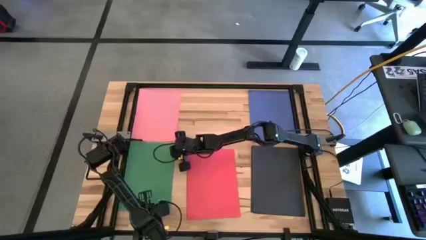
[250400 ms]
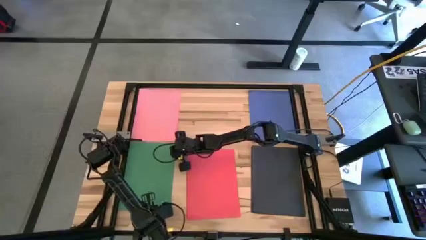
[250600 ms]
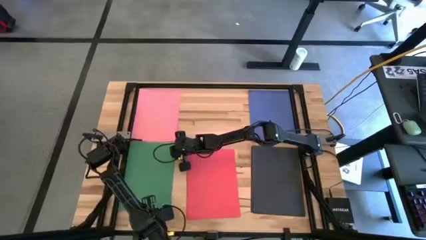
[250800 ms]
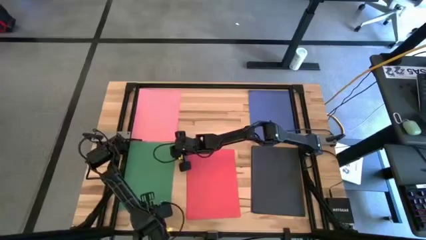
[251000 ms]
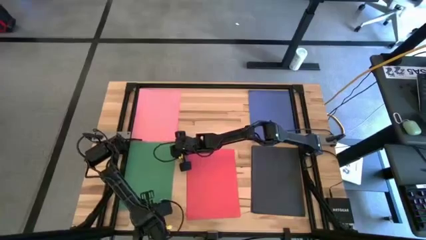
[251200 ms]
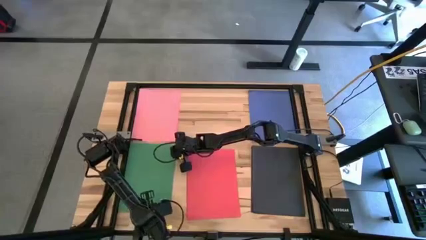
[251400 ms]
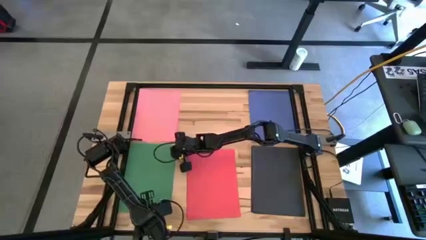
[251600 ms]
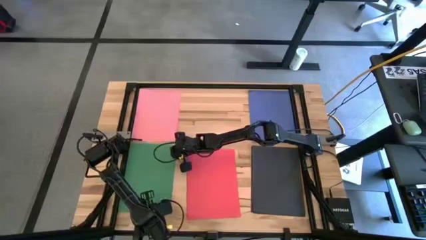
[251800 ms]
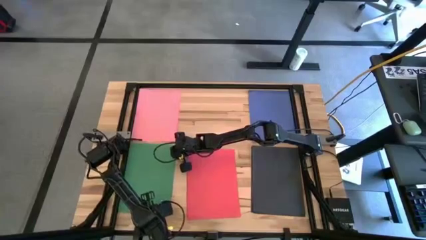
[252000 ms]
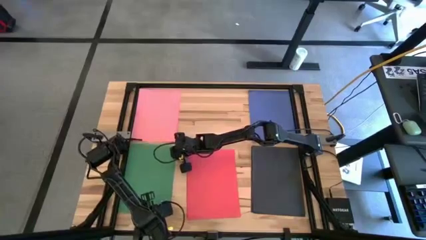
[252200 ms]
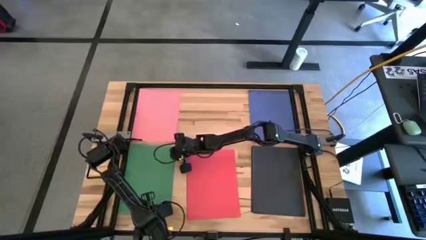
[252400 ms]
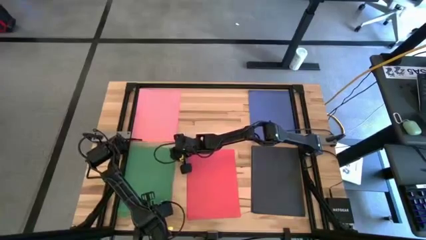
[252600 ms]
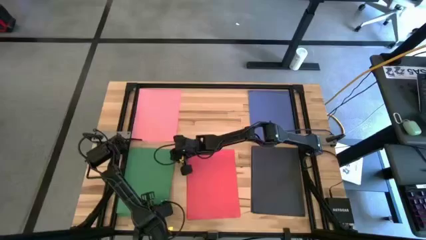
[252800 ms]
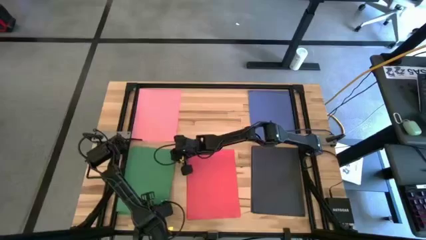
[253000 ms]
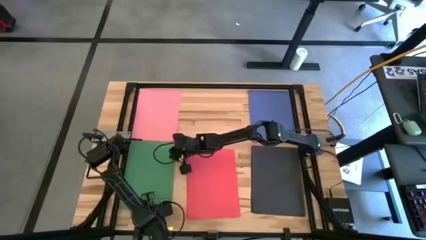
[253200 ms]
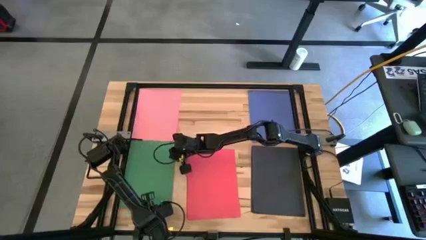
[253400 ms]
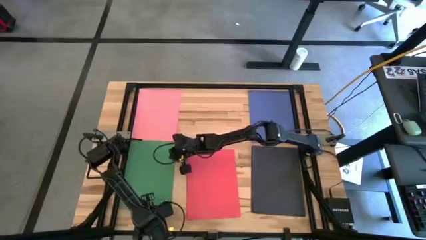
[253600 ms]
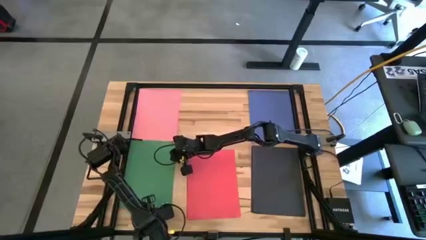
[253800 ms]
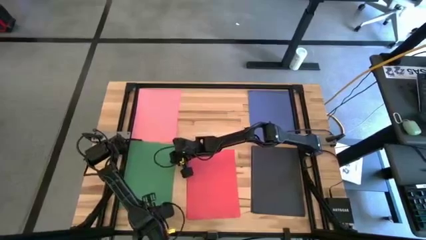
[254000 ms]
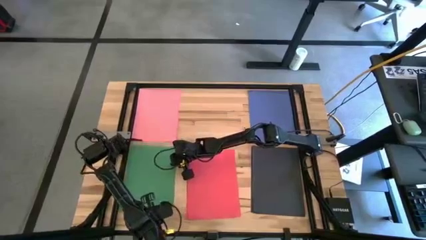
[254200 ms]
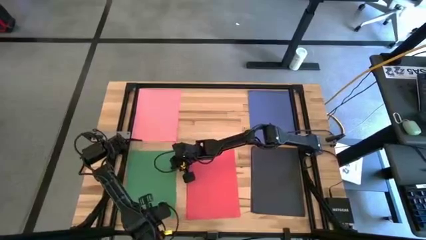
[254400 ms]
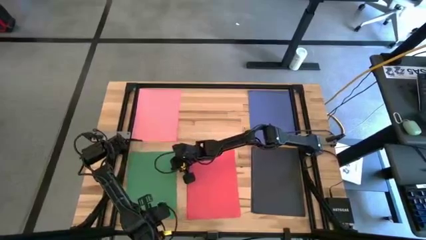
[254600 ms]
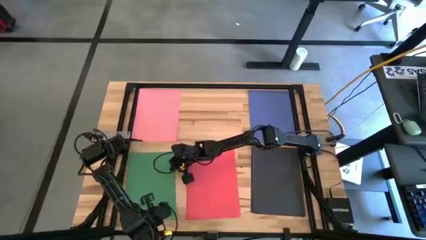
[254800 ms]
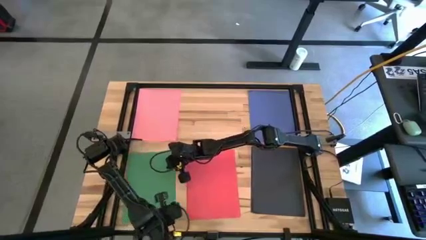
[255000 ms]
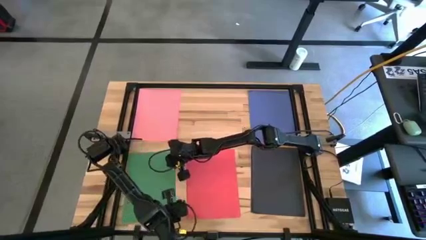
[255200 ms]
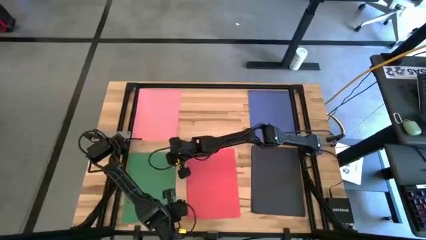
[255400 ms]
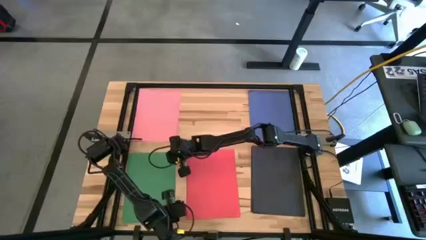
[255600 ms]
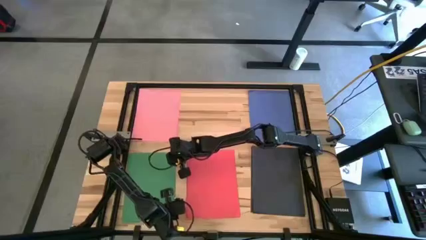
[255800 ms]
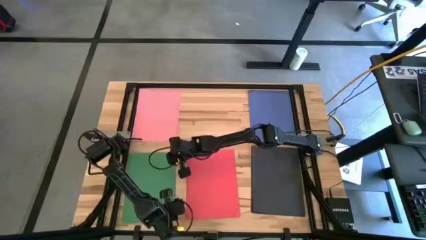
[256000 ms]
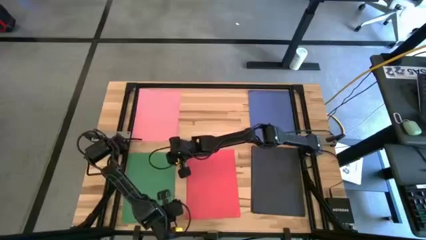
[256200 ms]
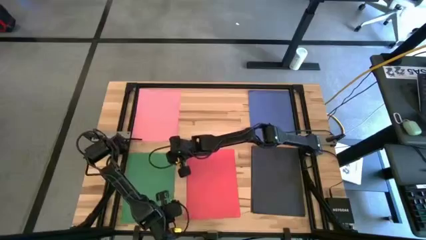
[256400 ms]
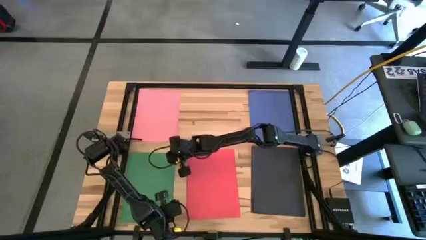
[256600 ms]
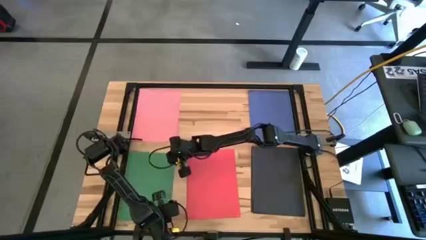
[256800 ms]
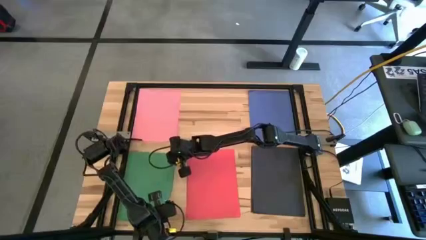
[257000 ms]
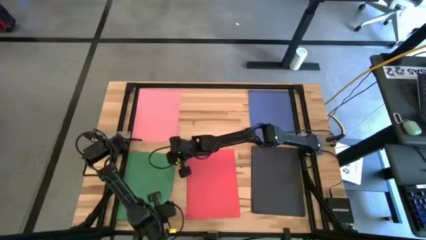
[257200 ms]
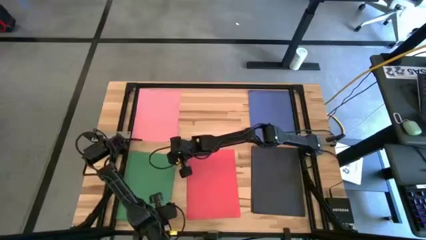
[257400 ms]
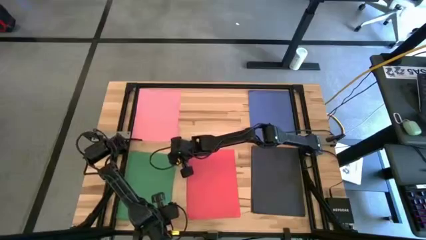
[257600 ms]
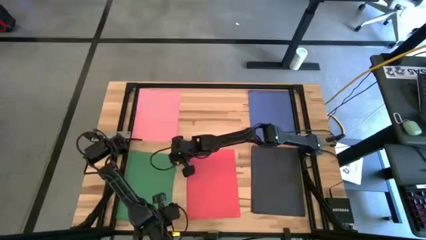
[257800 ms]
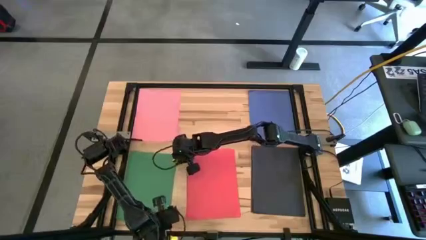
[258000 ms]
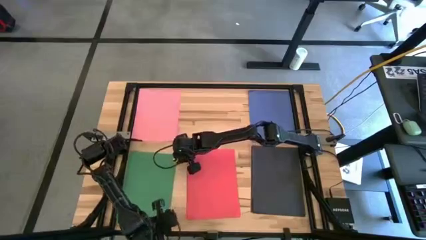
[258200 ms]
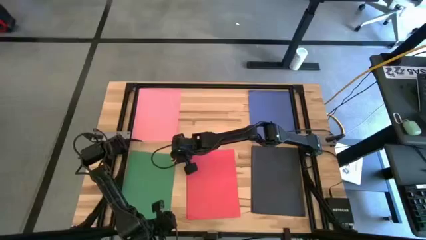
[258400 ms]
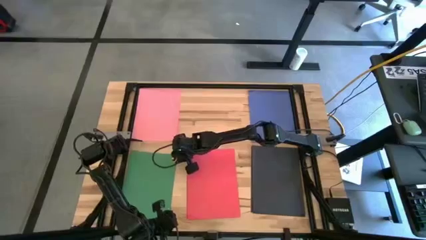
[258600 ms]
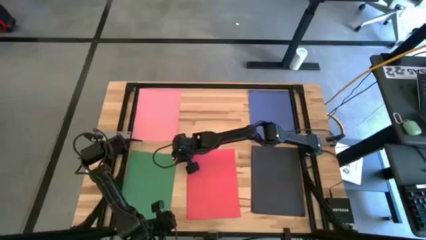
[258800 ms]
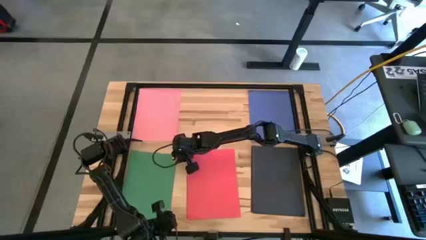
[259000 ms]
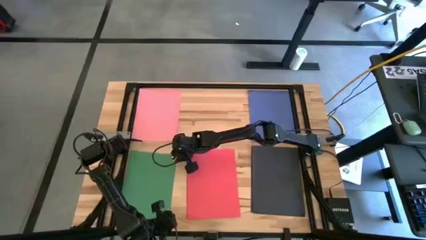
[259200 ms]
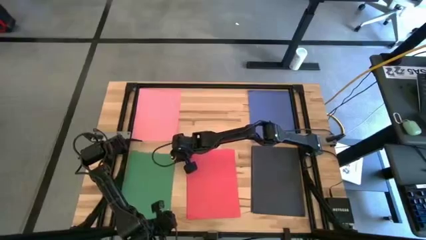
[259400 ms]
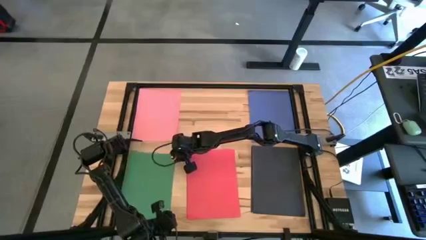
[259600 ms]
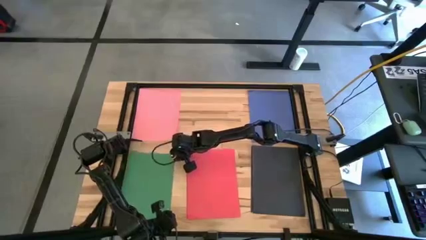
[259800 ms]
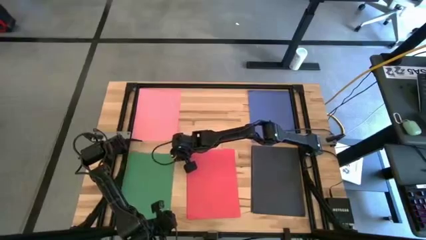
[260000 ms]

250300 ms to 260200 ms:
Task: Organize paper
Adjust the stacked green papers on the table

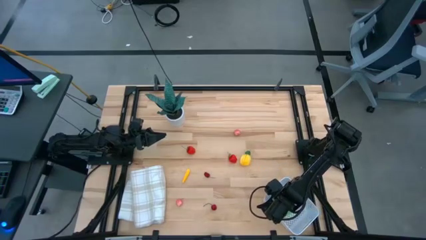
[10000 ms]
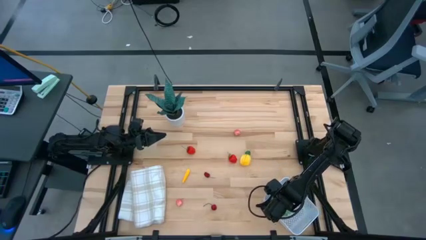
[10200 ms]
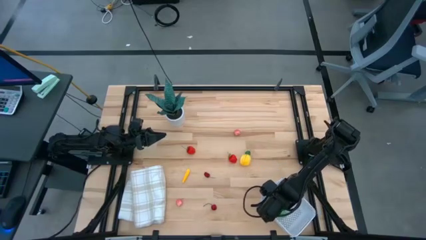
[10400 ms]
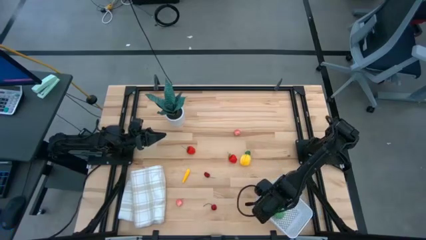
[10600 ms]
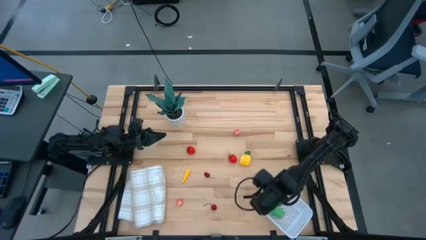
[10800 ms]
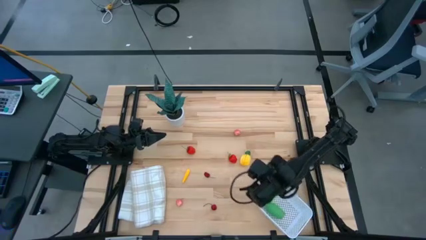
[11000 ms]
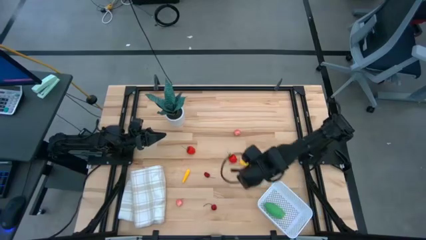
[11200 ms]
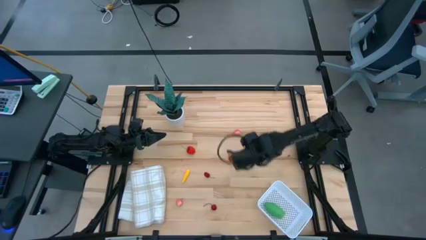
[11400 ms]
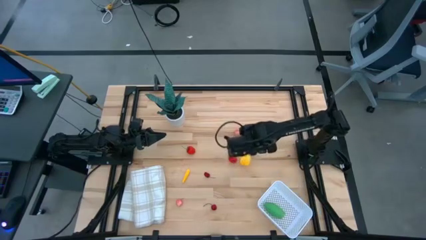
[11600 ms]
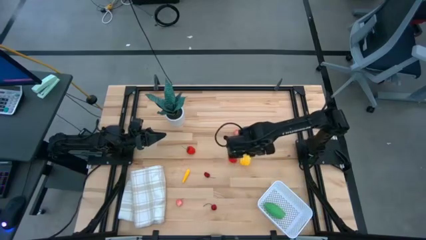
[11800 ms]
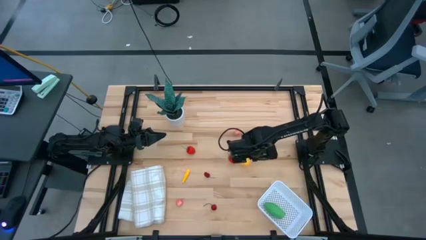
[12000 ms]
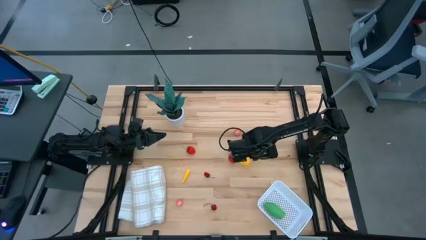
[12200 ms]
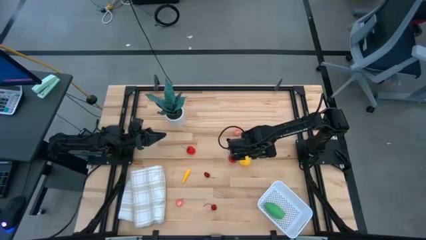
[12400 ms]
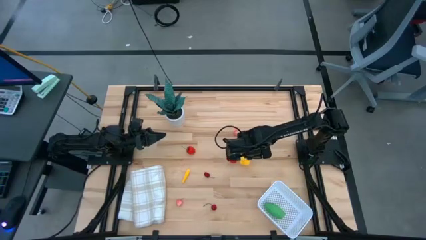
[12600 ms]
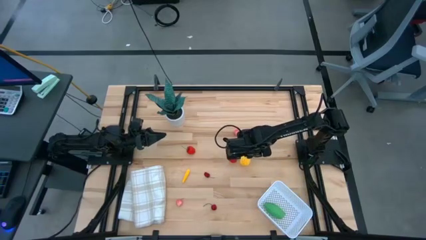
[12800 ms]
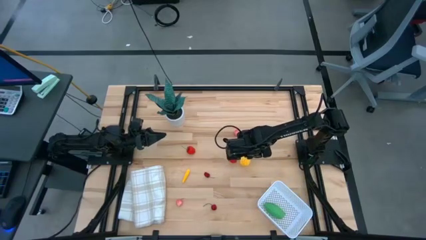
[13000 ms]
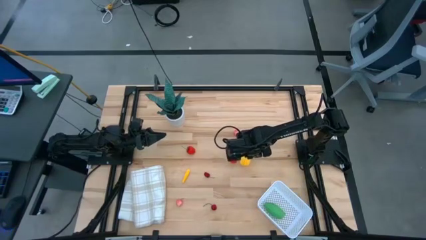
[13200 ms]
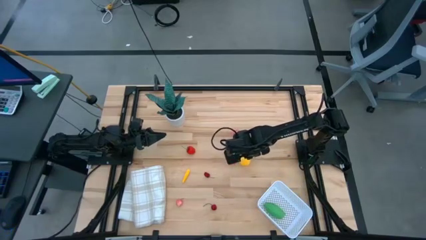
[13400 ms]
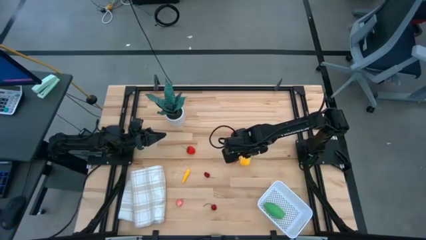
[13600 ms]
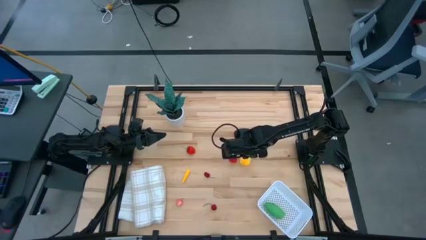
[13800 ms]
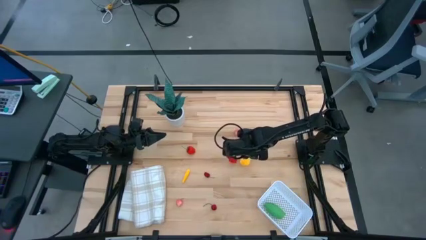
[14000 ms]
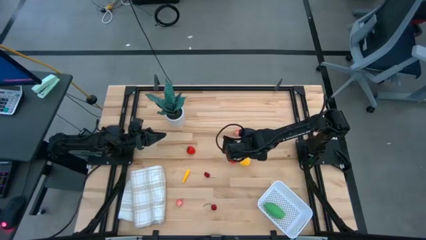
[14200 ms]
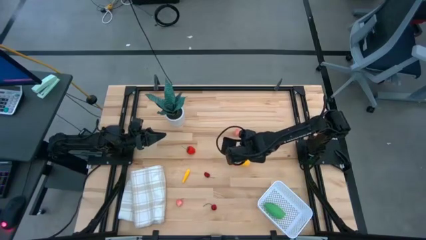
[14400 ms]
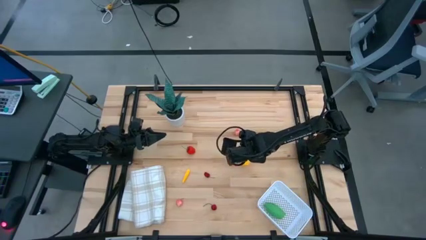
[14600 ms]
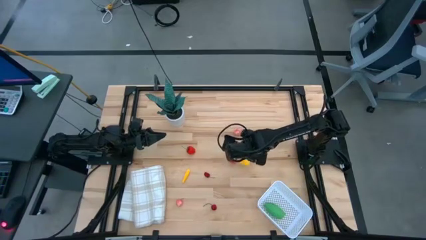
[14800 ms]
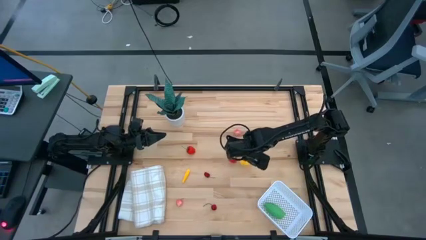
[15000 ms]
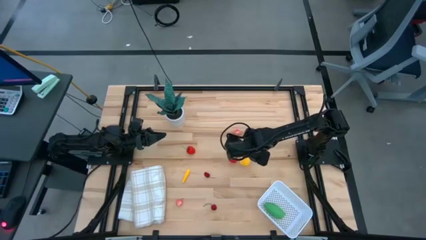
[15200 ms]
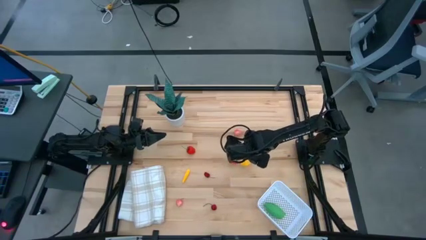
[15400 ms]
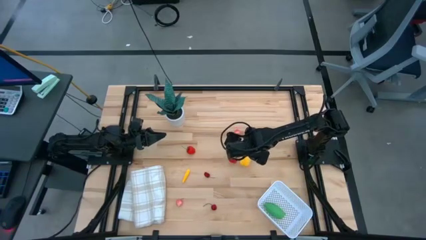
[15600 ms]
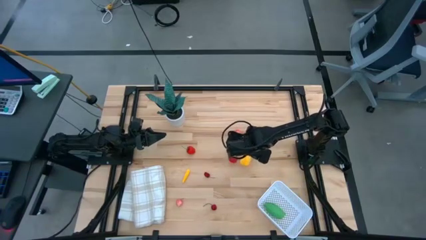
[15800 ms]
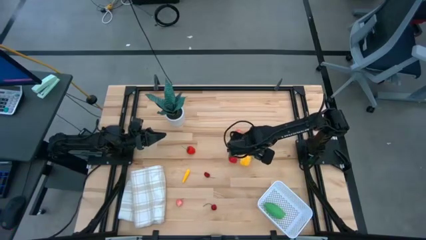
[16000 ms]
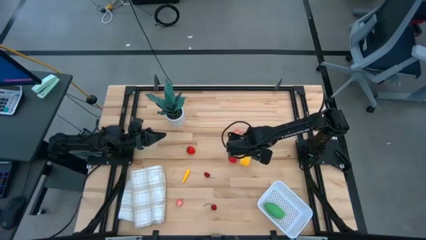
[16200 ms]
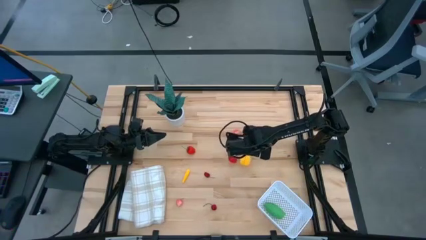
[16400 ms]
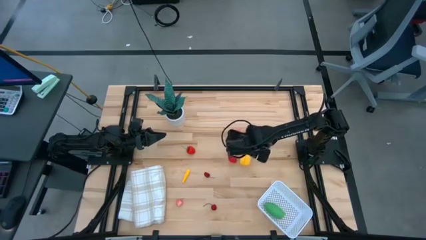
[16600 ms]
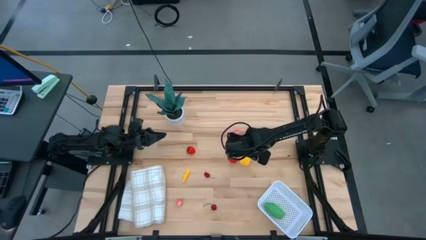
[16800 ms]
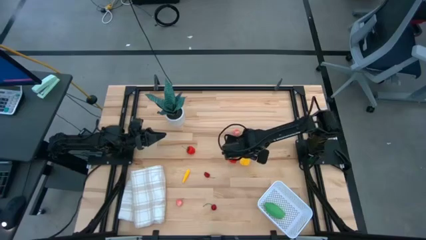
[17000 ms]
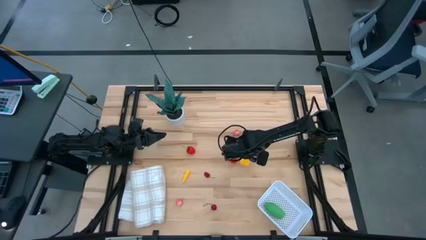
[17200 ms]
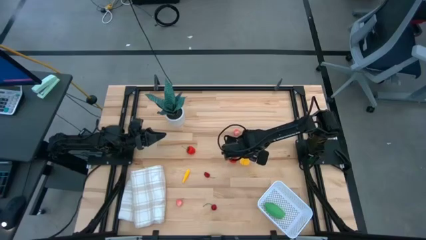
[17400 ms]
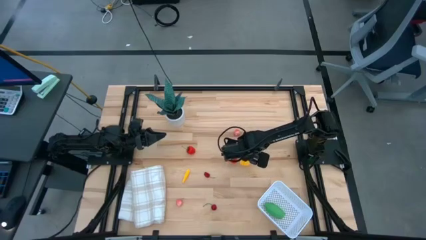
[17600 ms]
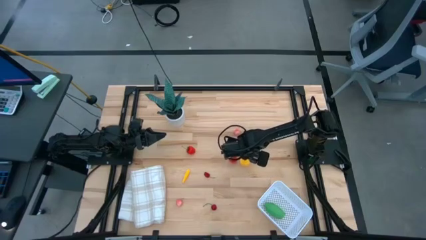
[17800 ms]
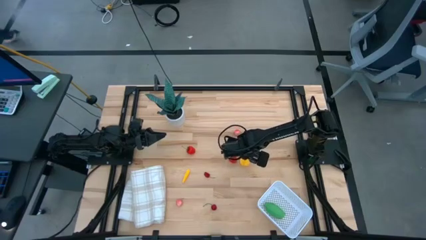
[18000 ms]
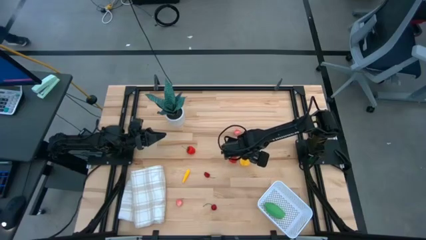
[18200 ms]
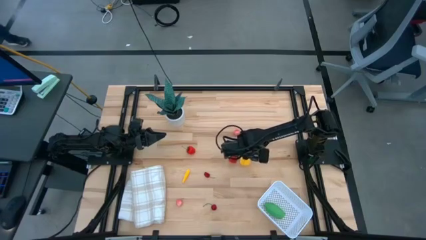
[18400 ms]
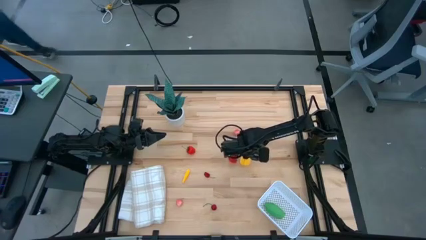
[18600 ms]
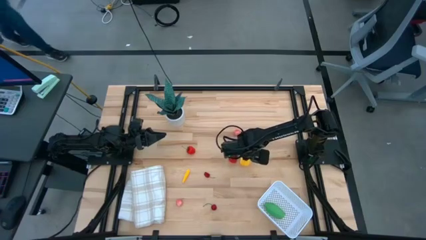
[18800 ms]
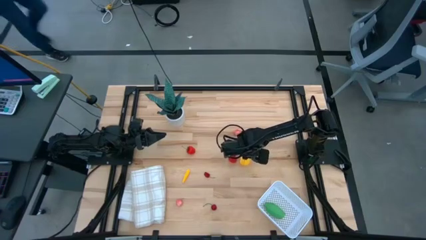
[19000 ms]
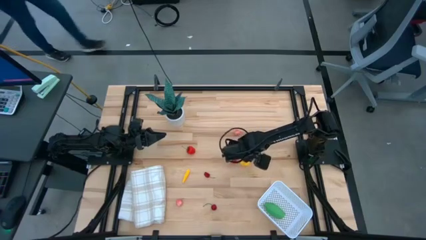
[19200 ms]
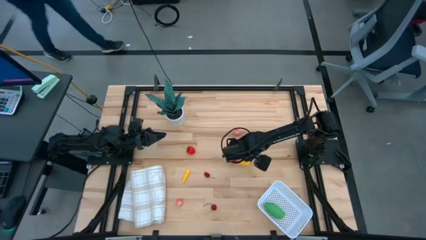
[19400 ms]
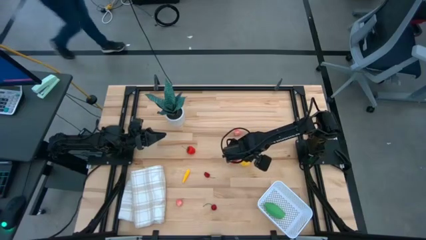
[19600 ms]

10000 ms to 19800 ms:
Task: Pick and placing Produce into tupperware
Put the yellow pineapple into the white bin
